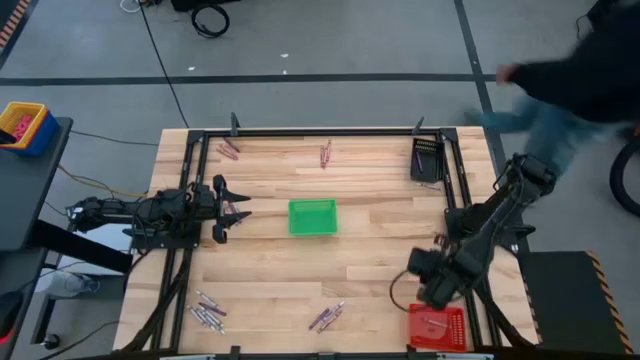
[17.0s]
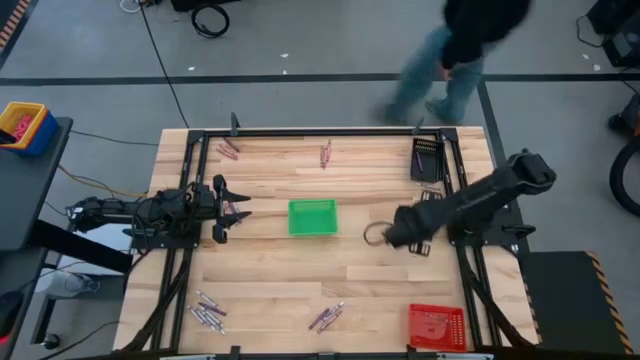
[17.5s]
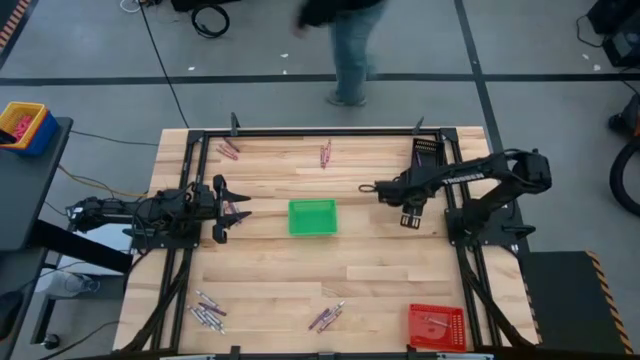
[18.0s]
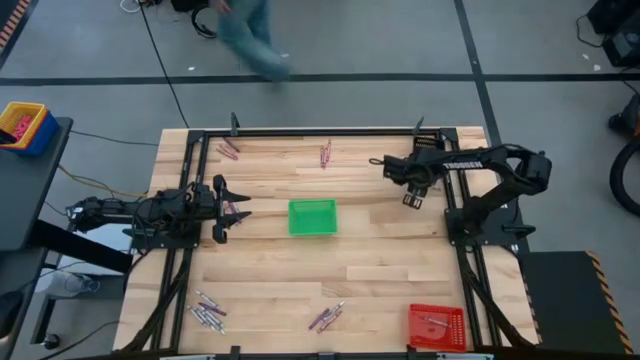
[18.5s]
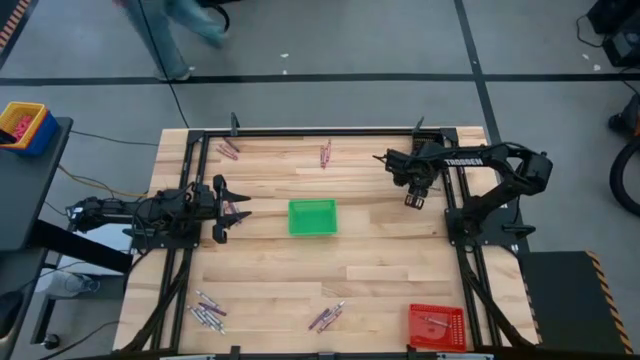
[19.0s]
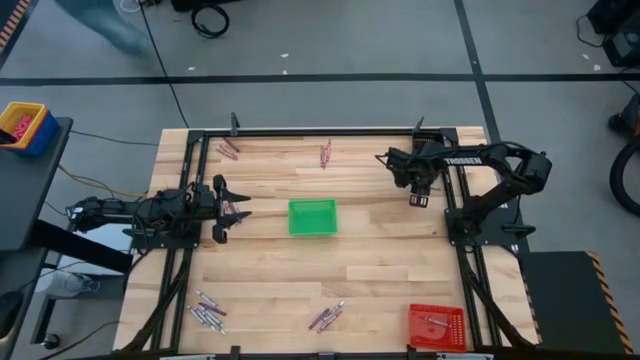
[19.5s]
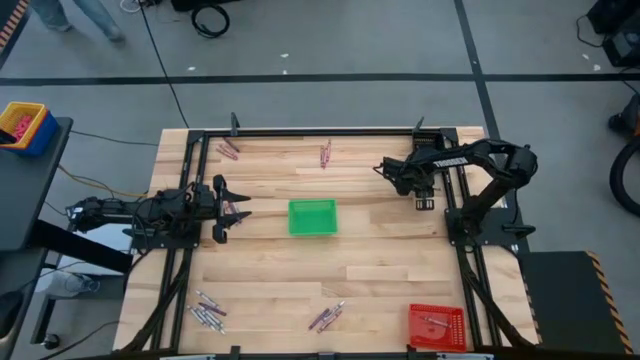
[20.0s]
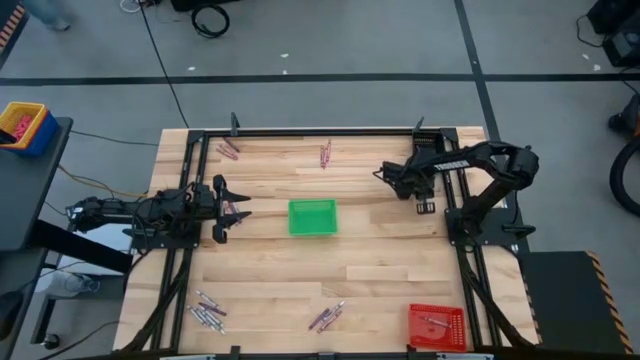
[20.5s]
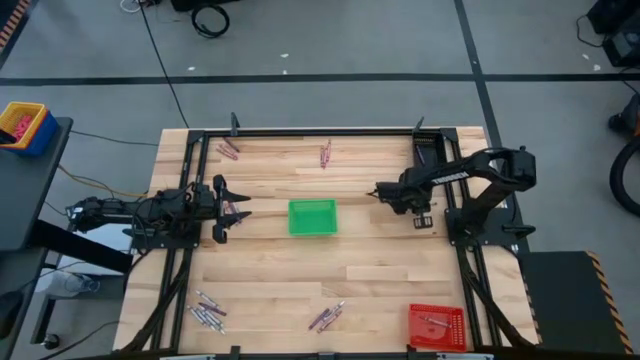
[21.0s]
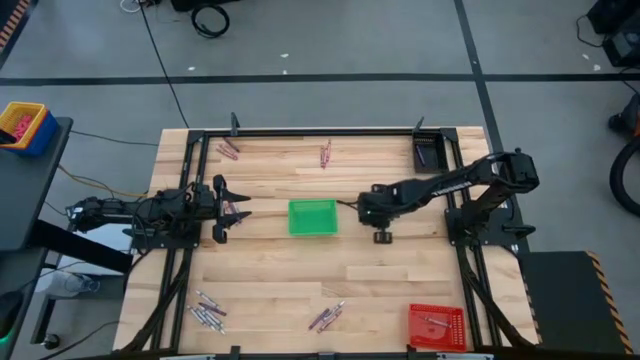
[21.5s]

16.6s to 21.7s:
Task: Sort crayons
Put the white crayon into the green basket

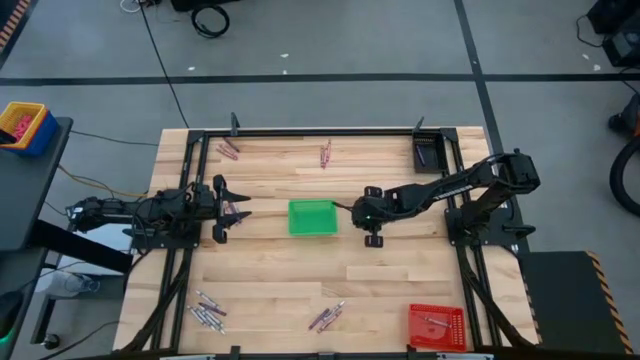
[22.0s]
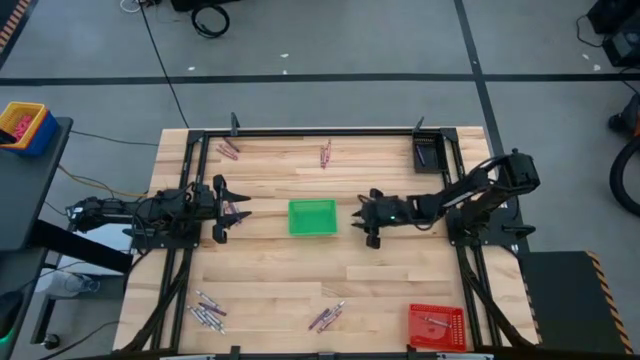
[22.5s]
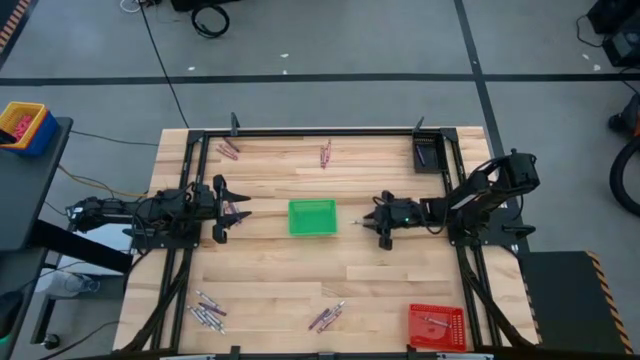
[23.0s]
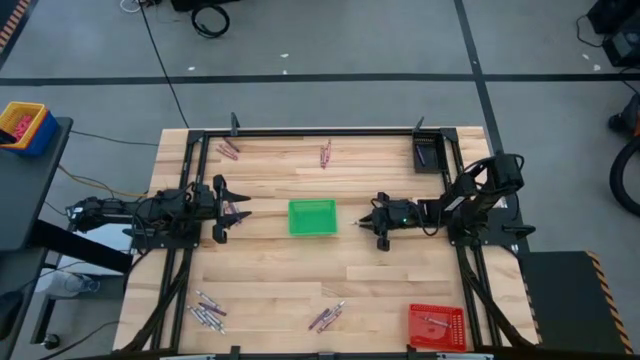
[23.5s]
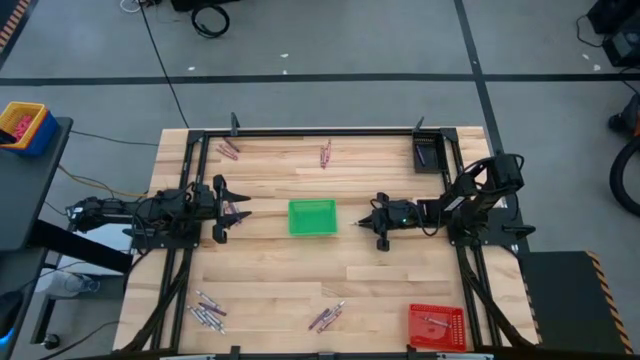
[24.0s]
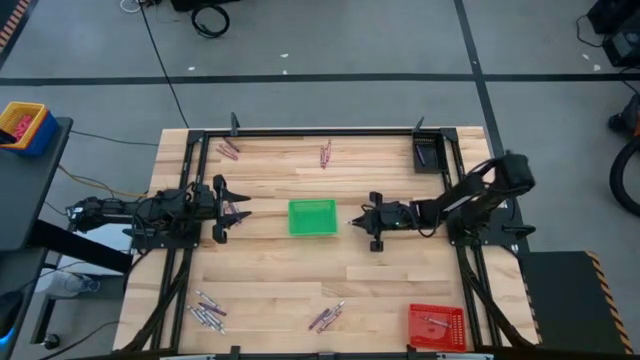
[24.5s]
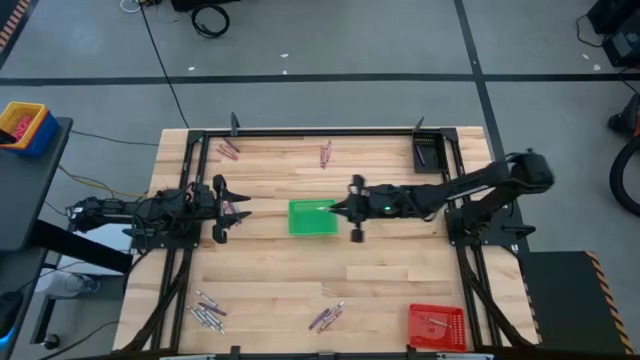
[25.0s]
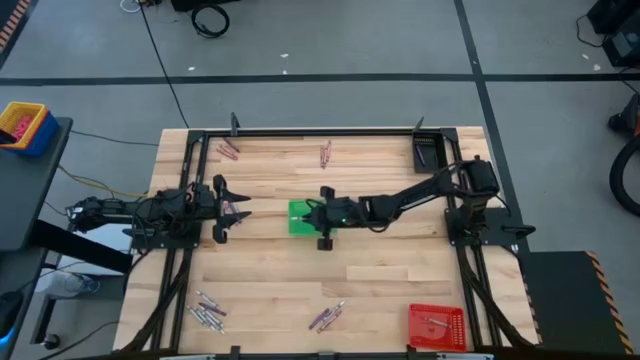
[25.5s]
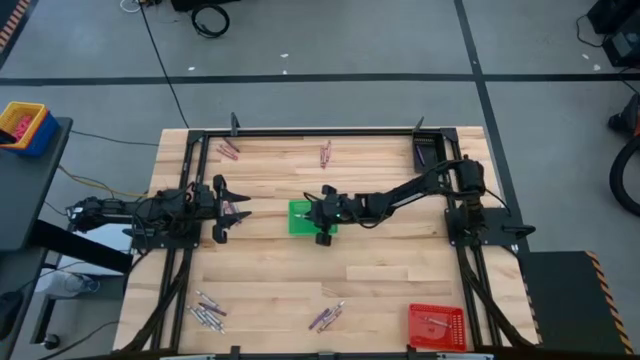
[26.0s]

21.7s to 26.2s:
Put the white crayon into the green basket

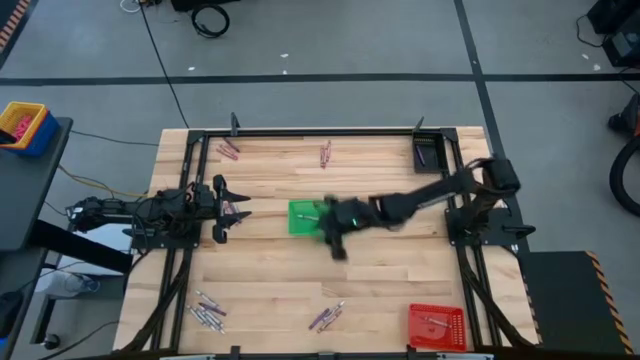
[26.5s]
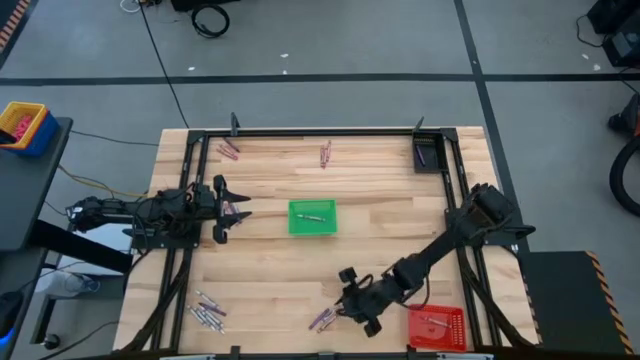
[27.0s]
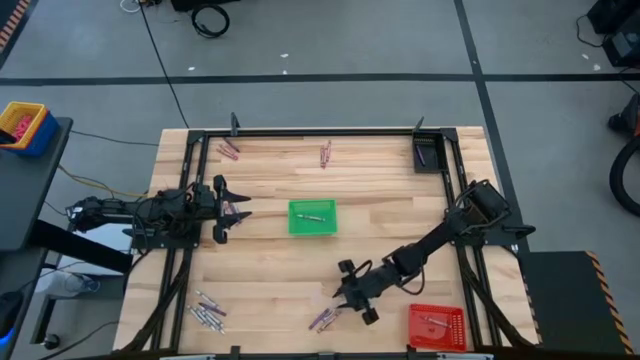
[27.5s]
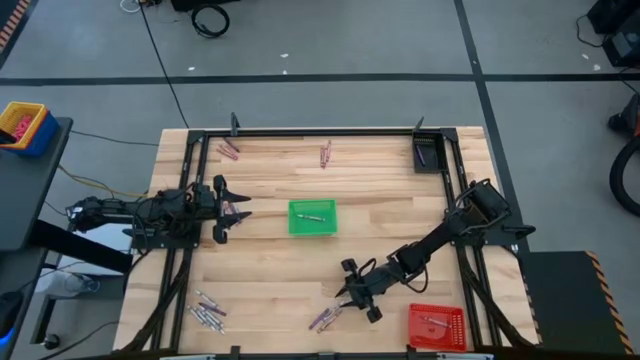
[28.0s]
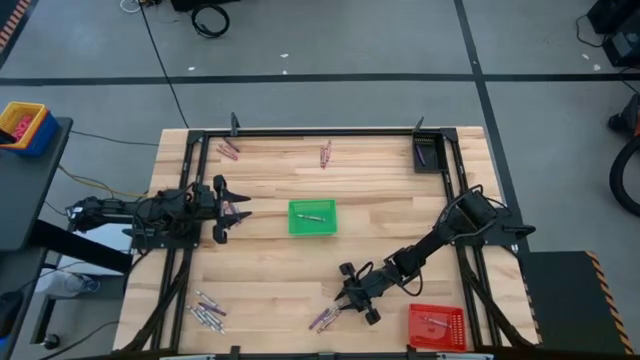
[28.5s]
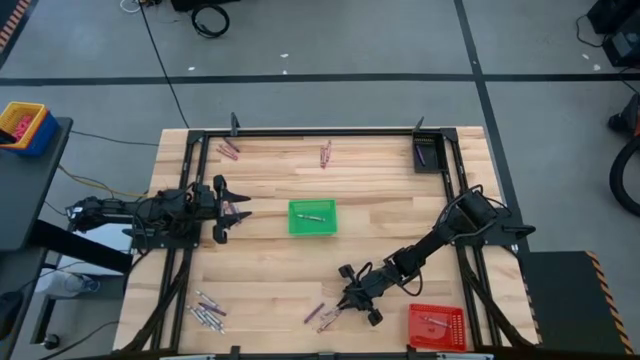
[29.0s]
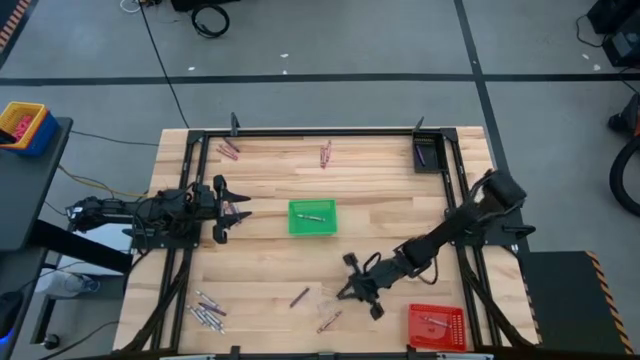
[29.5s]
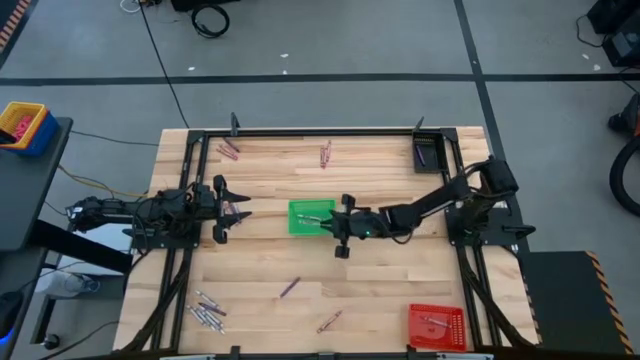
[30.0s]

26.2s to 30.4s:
Put the white crayon into the green basket

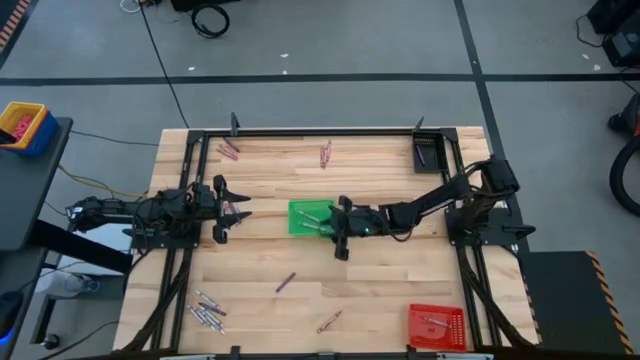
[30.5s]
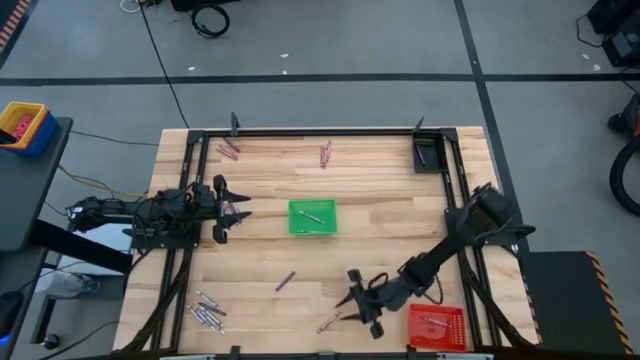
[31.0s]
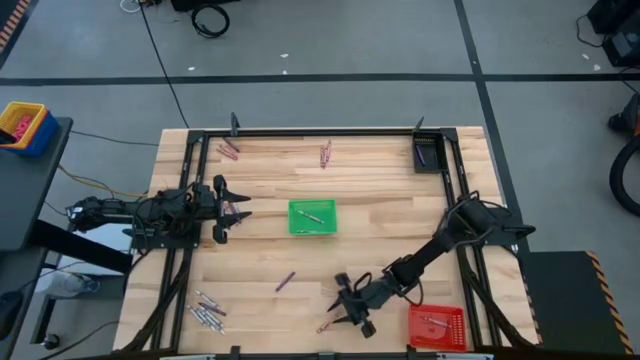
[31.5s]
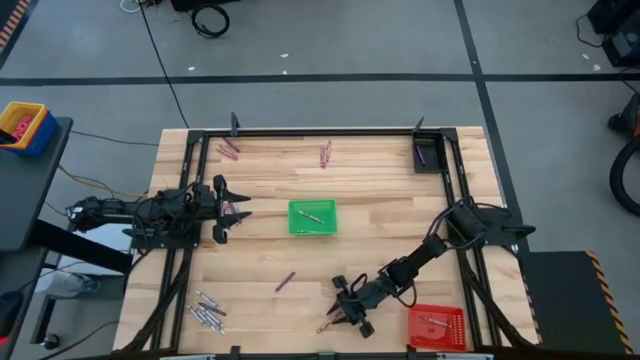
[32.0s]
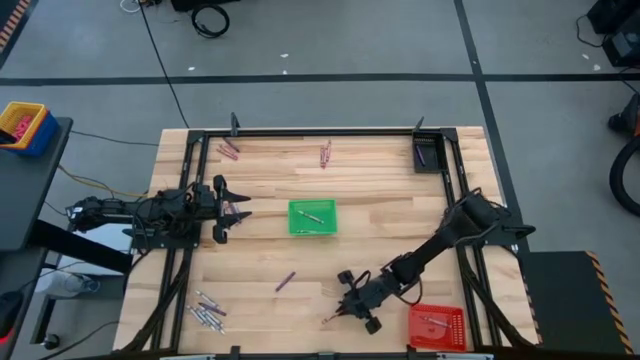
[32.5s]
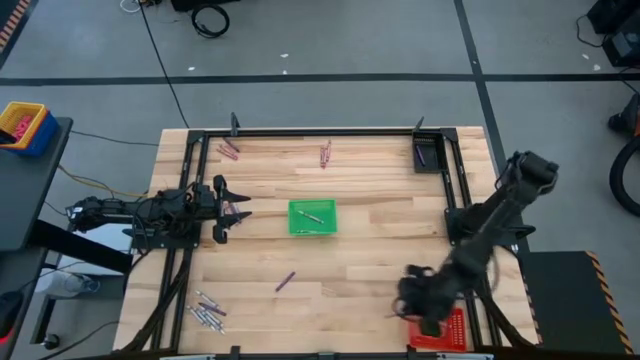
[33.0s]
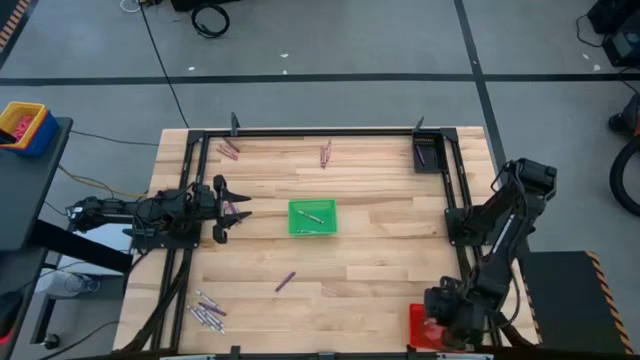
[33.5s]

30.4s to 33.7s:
Put the pink crayon into the red basket

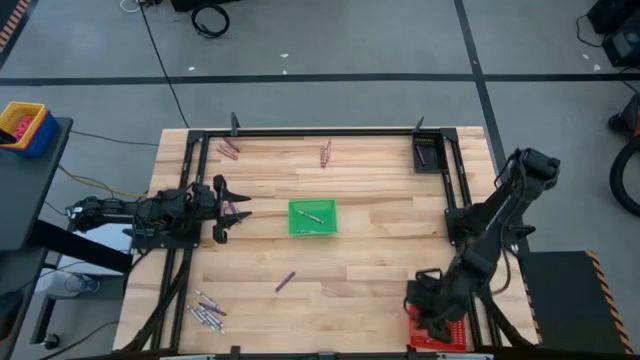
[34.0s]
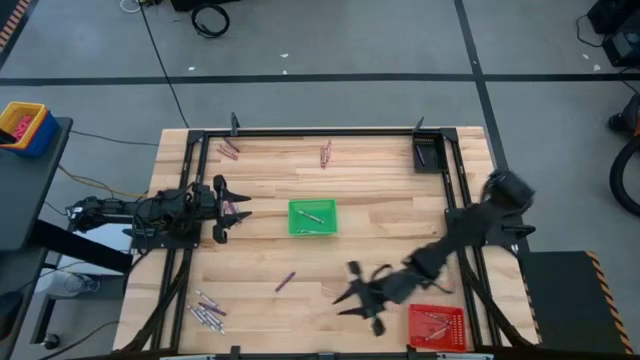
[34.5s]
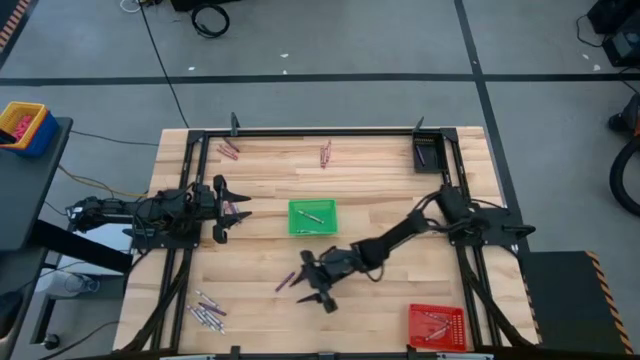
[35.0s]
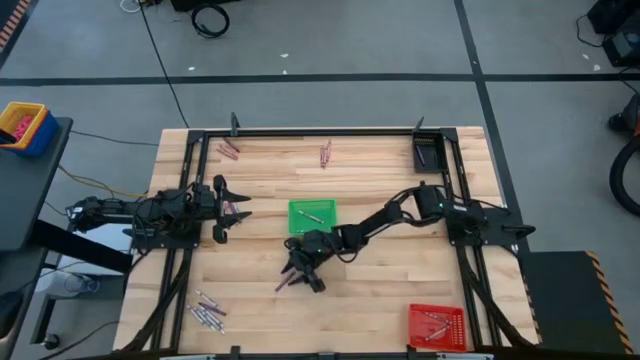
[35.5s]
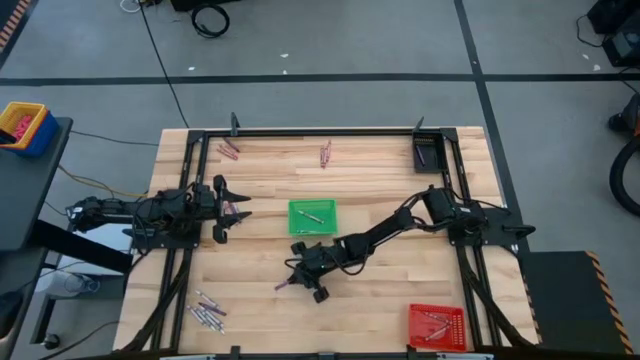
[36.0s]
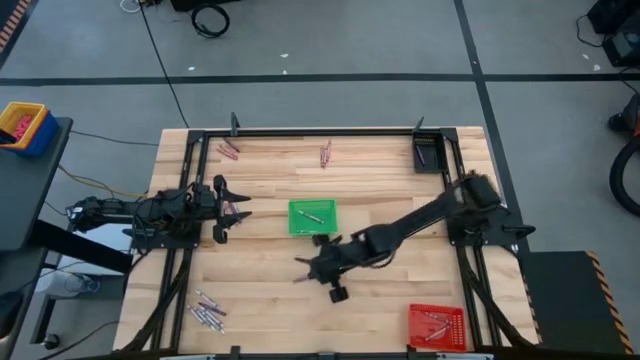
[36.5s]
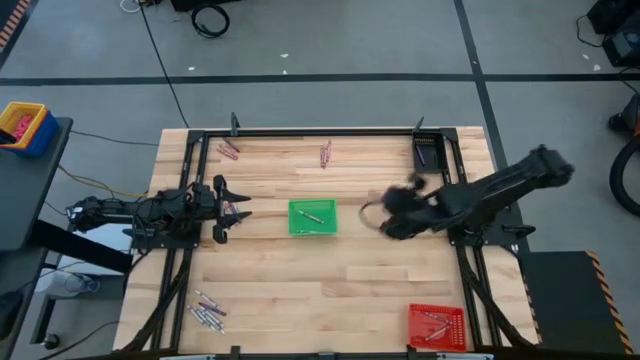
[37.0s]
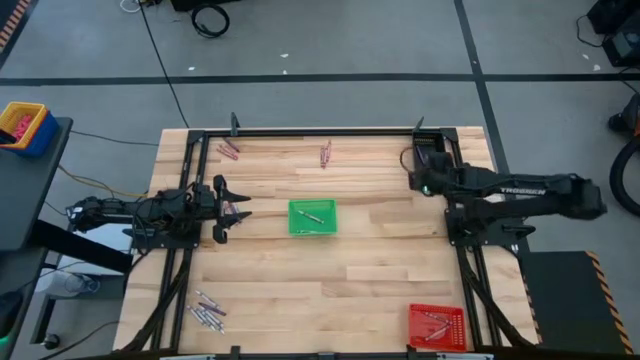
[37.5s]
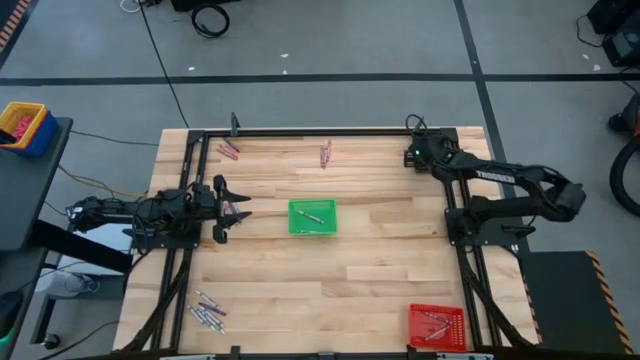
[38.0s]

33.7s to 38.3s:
Put the violet crayon into the black basket
